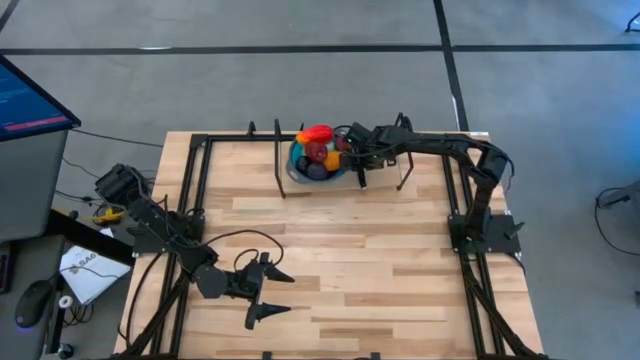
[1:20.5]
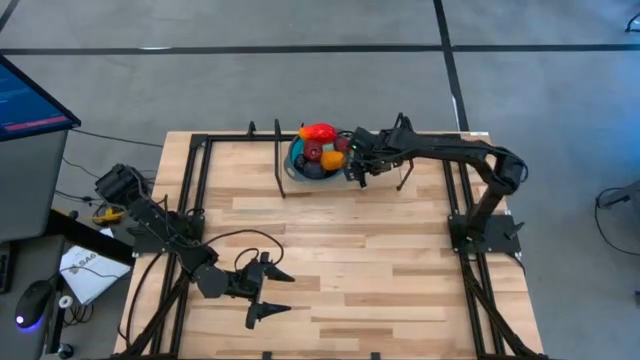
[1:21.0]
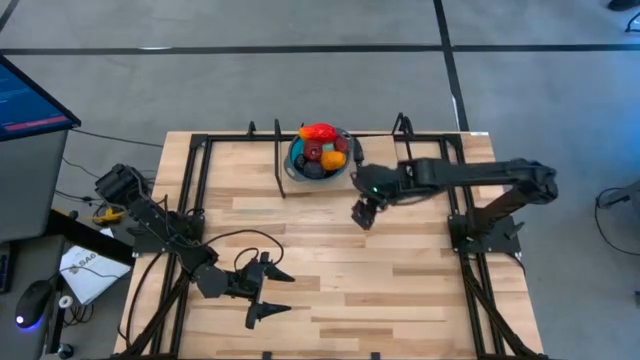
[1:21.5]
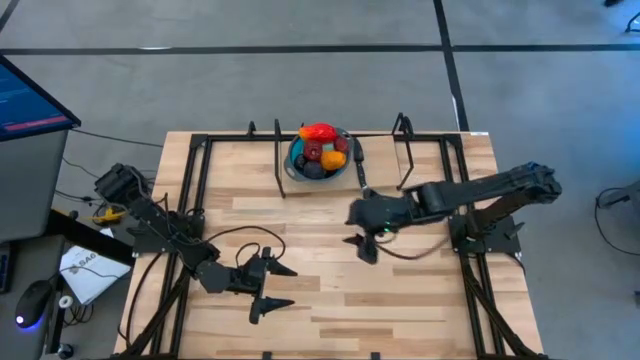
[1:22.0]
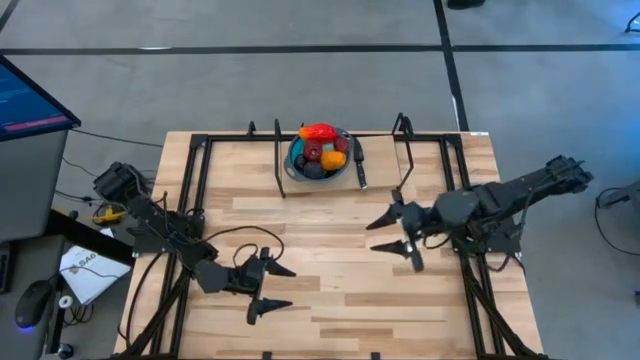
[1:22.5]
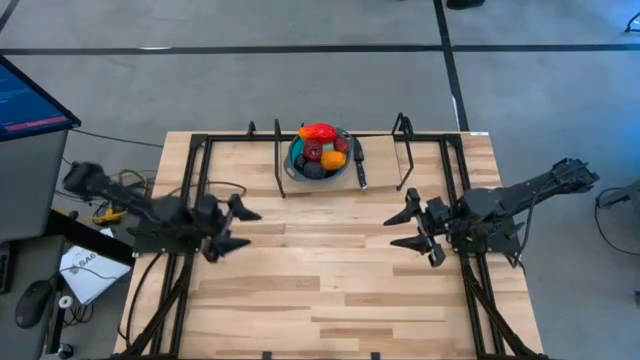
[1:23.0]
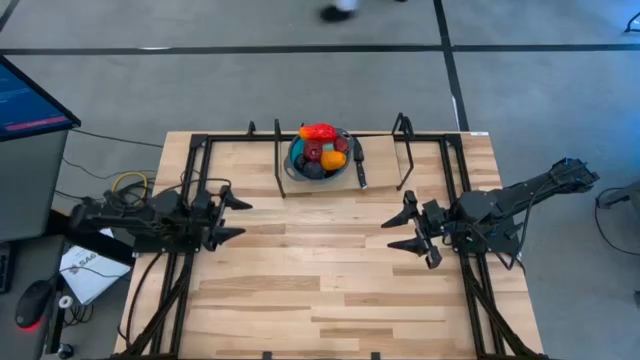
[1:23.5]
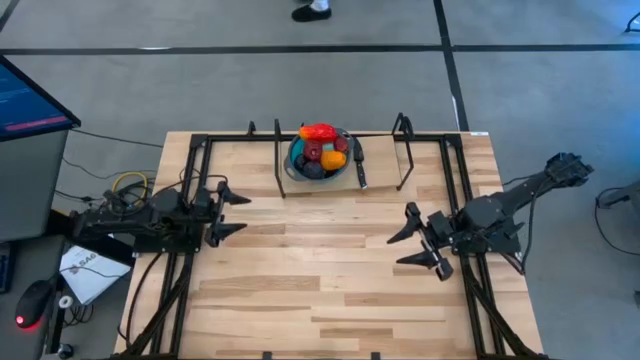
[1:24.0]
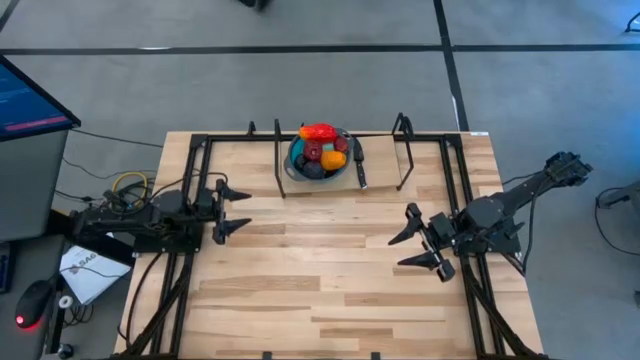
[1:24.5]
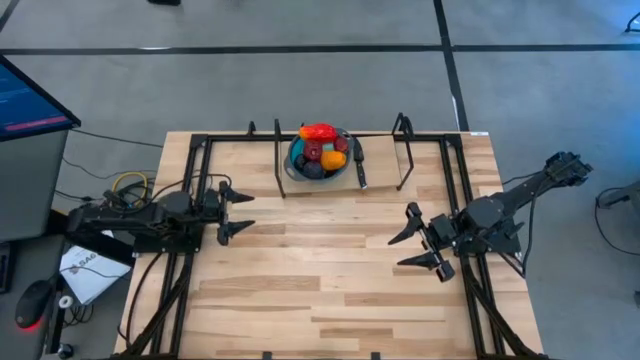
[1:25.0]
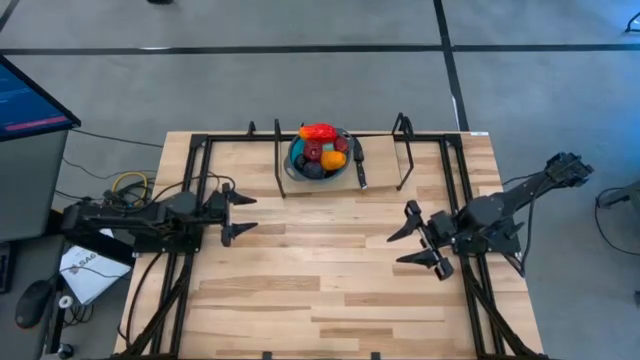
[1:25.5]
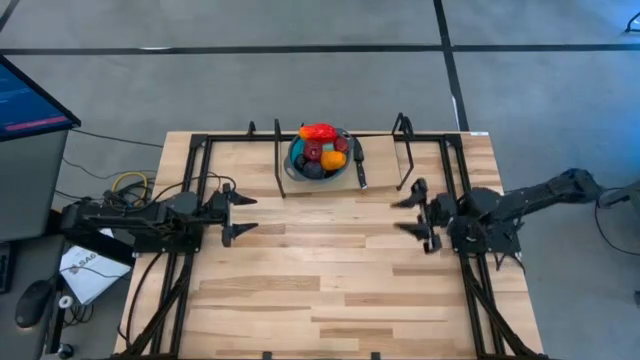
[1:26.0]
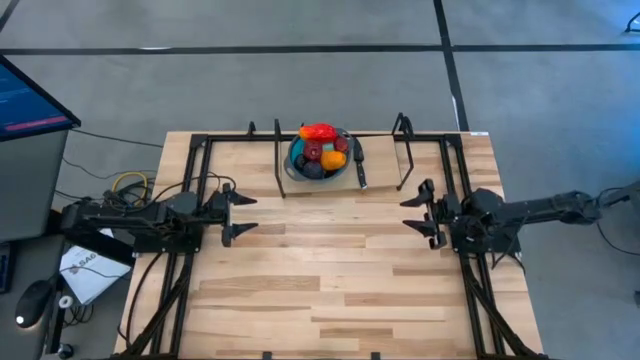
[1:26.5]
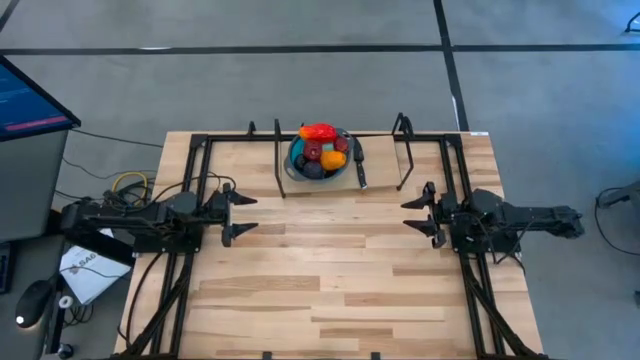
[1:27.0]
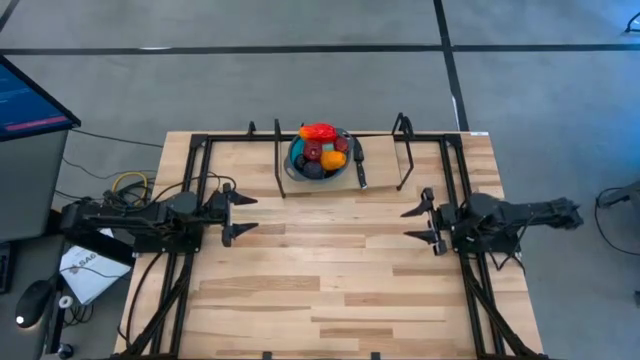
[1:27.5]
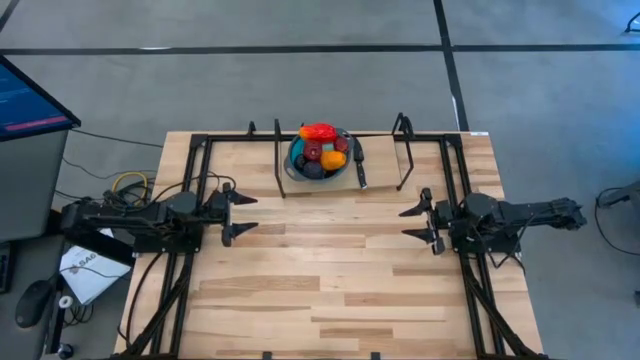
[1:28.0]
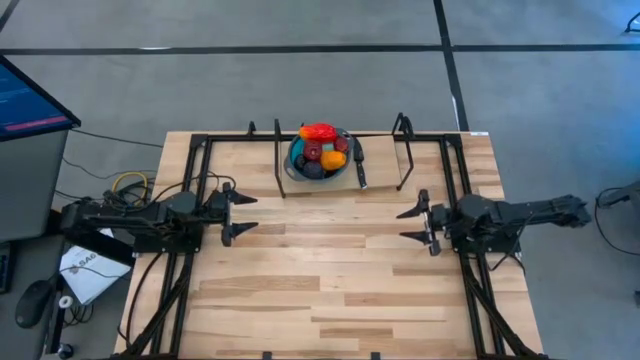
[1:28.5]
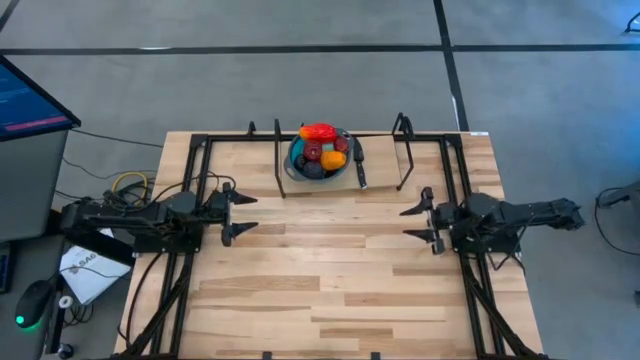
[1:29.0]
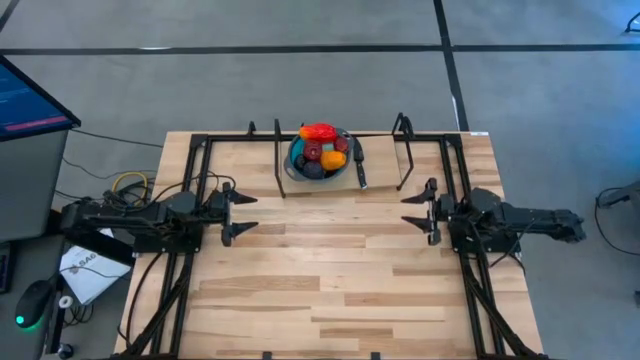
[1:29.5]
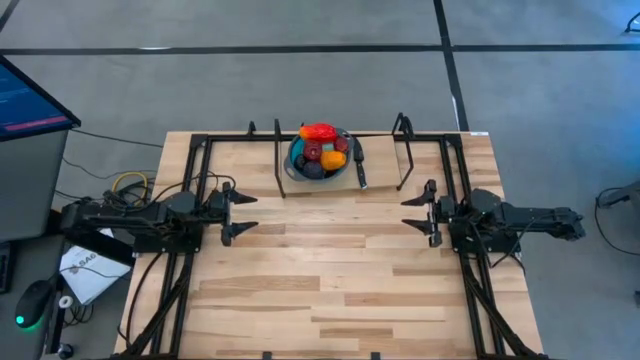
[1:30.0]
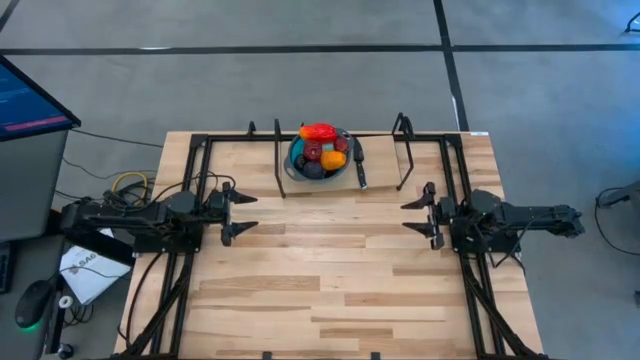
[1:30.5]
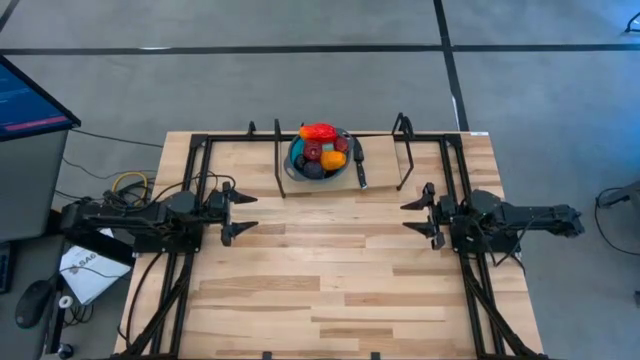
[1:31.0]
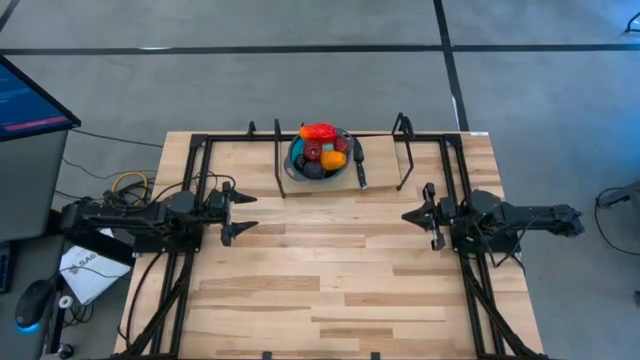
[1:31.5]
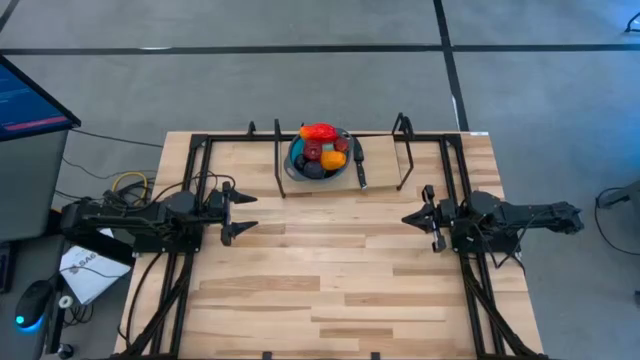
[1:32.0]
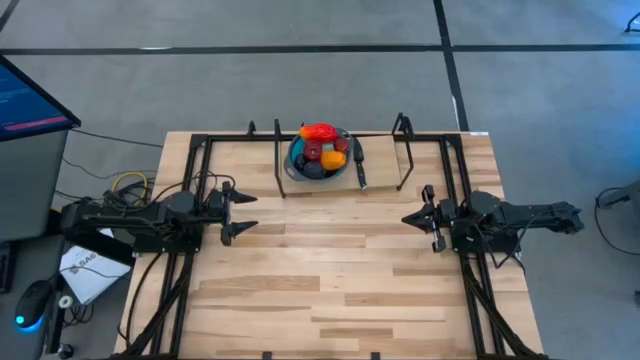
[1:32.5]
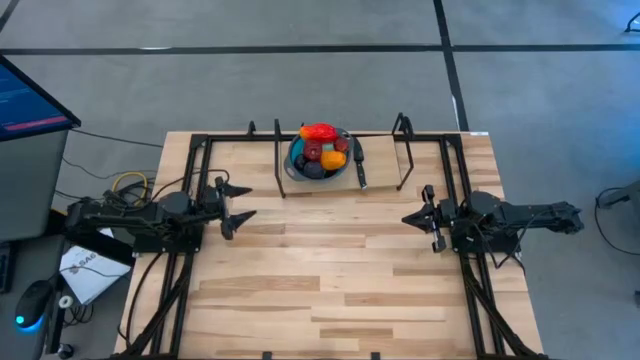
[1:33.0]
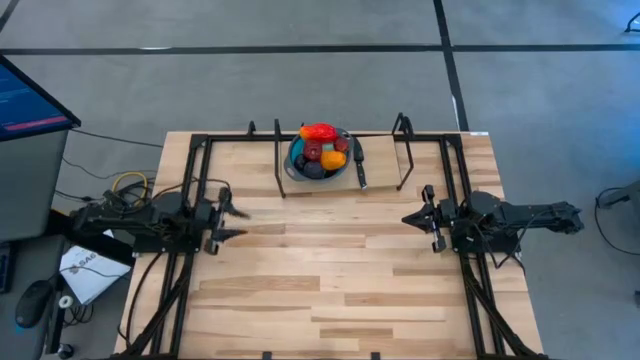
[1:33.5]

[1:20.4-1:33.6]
Task: Pick & Place Fruit
Return to Home Position

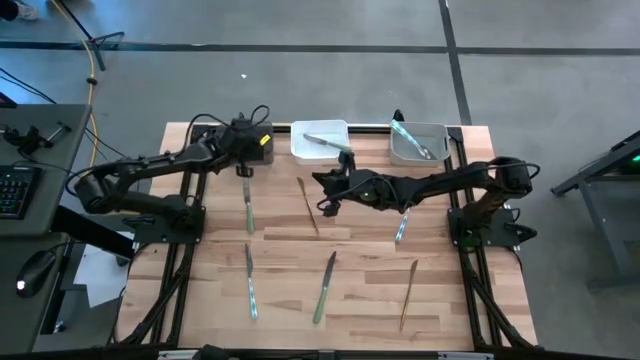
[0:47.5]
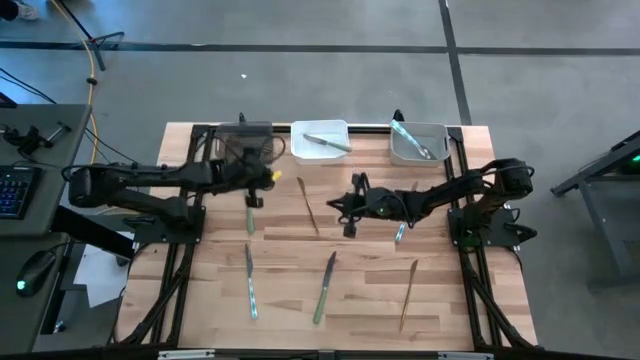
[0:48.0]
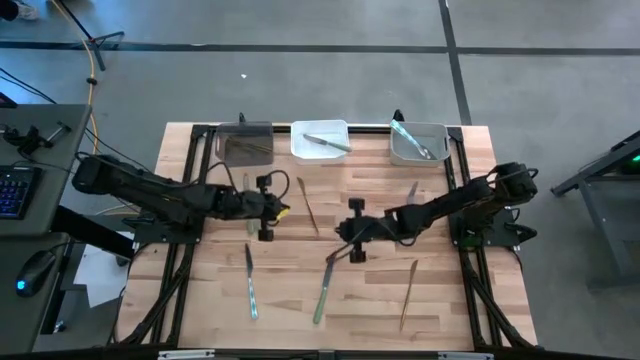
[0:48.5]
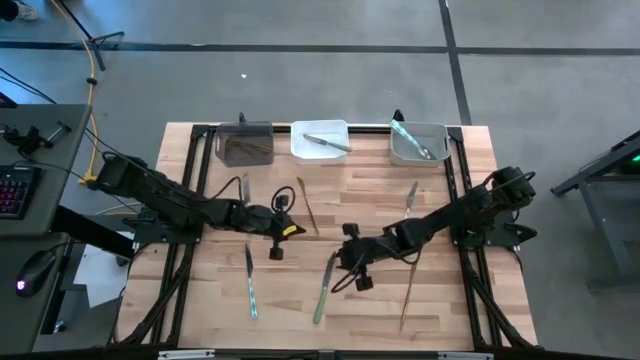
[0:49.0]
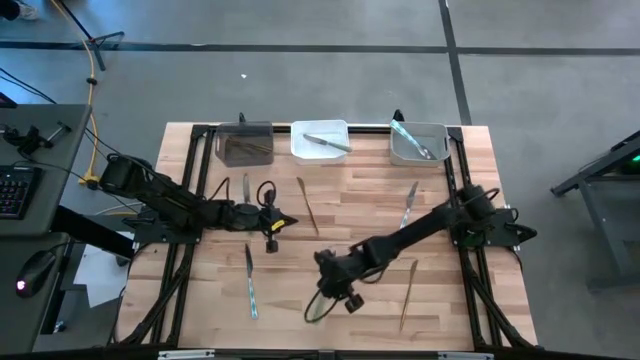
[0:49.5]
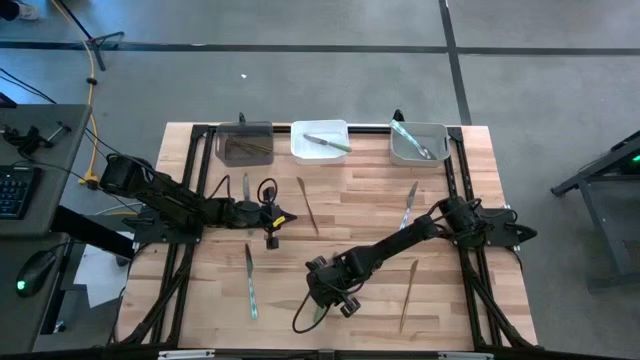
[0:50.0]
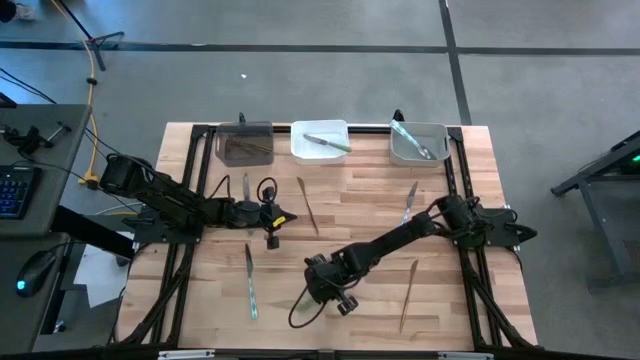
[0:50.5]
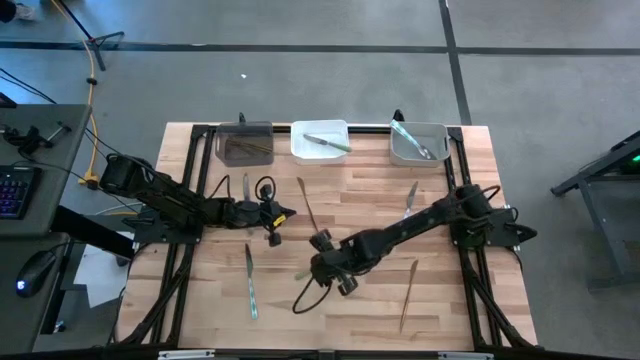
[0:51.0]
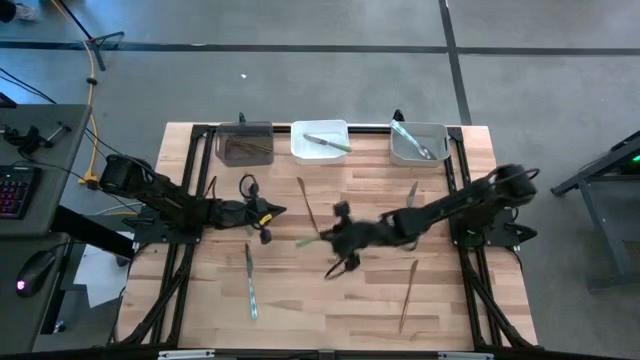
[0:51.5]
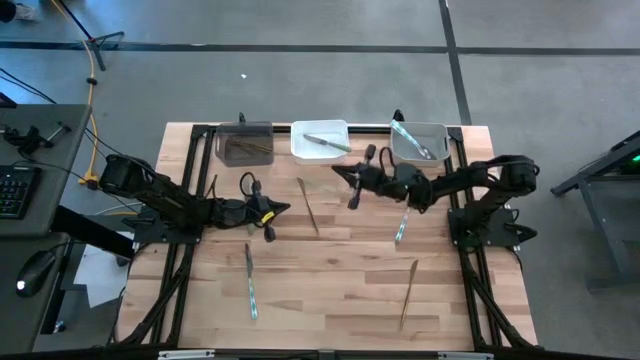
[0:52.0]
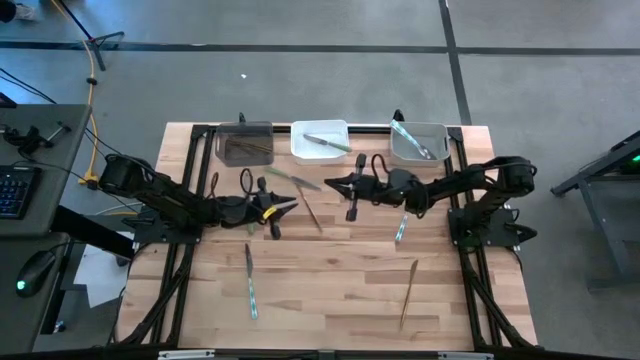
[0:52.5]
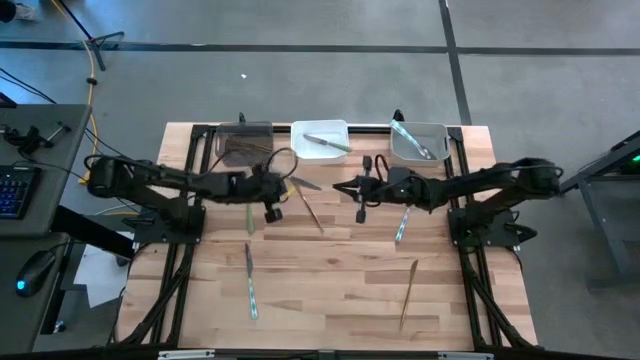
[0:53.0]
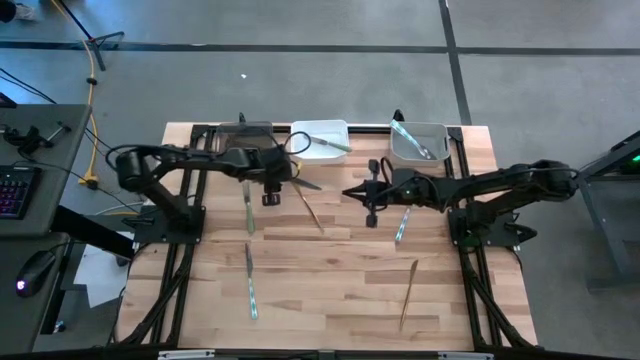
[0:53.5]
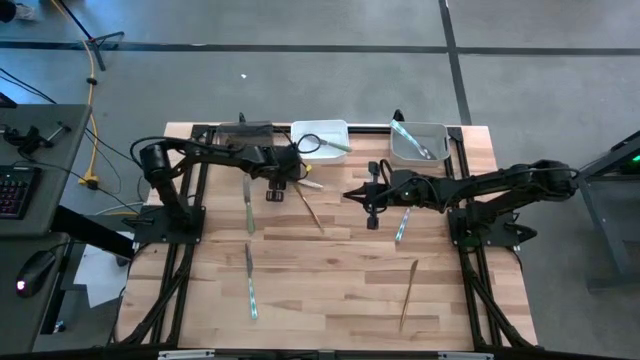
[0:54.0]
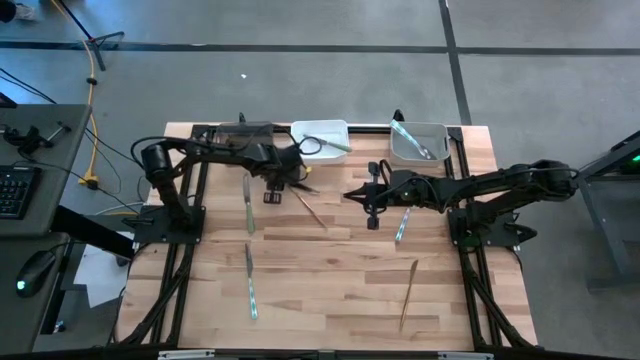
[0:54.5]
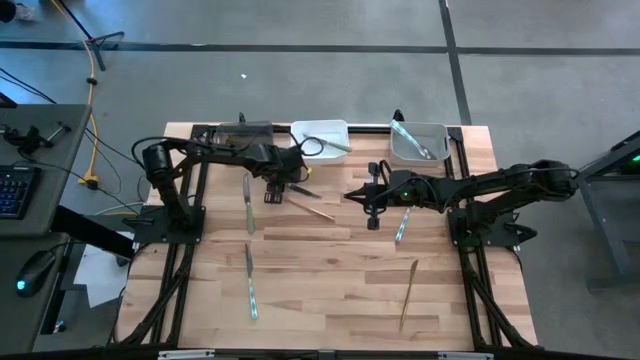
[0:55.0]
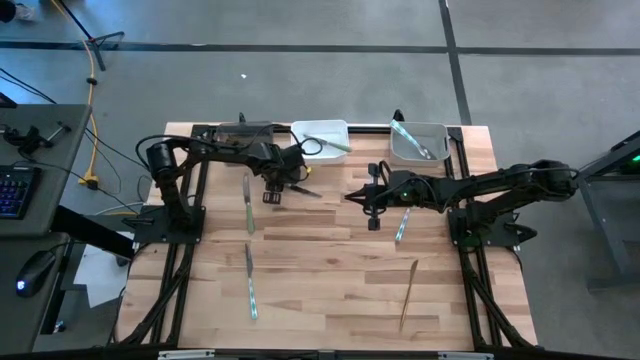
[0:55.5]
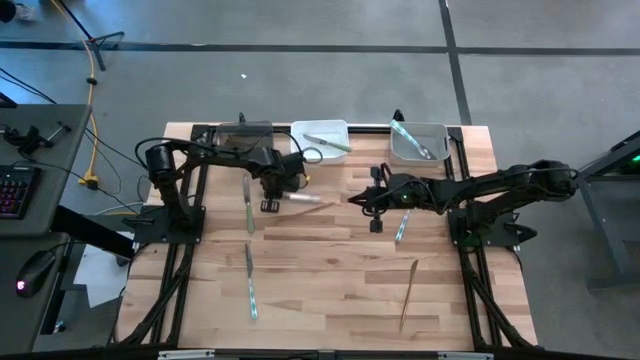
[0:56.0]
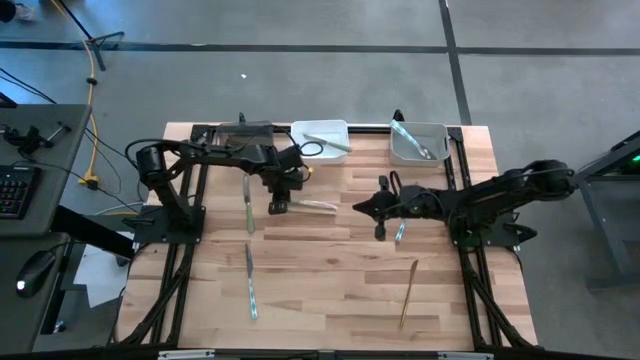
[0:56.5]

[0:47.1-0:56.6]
Task: Sort silverware by color (type)
Put the green knife into the white bin
